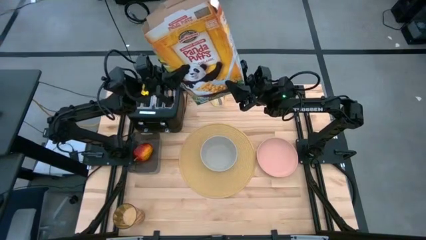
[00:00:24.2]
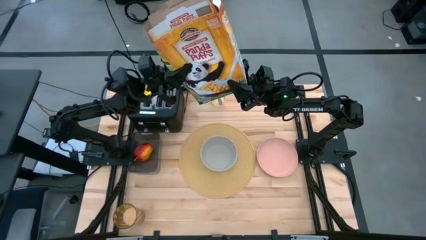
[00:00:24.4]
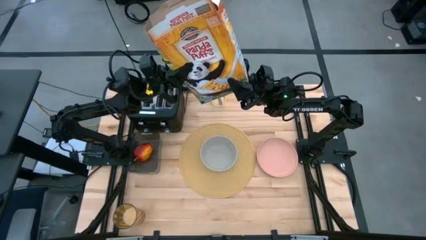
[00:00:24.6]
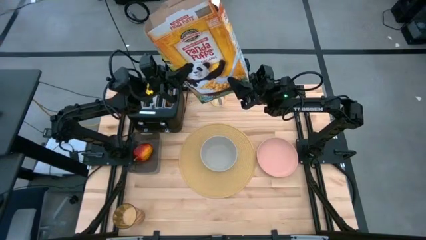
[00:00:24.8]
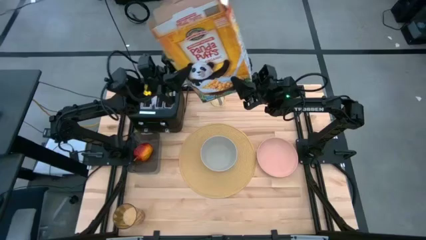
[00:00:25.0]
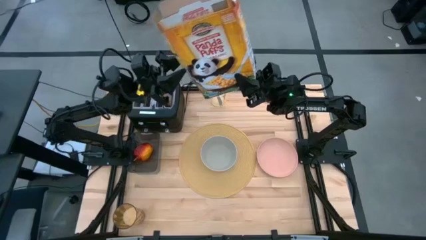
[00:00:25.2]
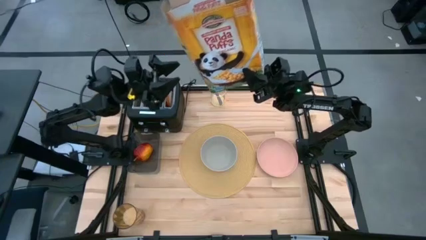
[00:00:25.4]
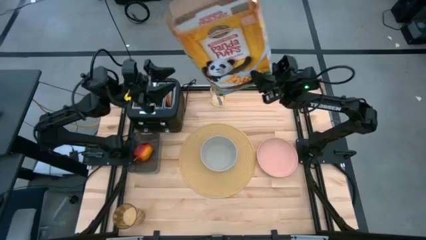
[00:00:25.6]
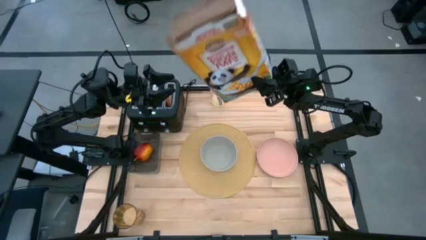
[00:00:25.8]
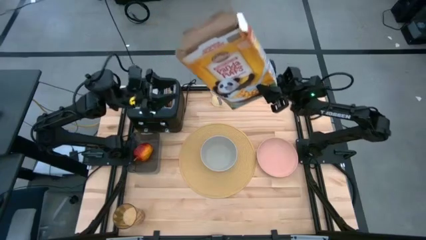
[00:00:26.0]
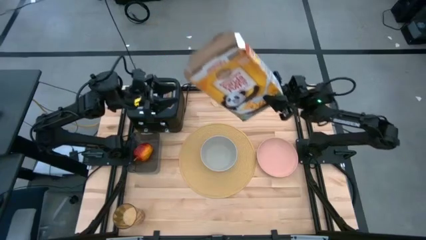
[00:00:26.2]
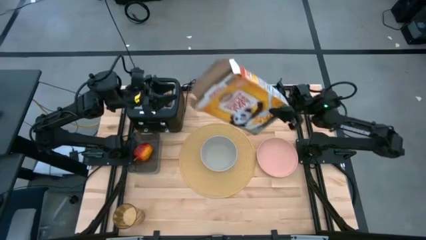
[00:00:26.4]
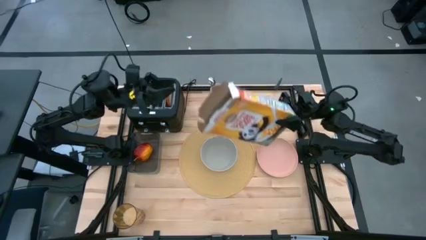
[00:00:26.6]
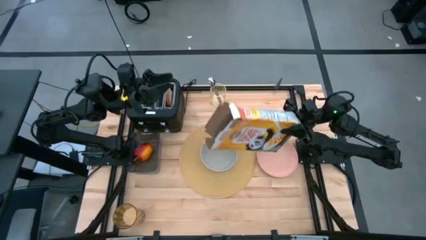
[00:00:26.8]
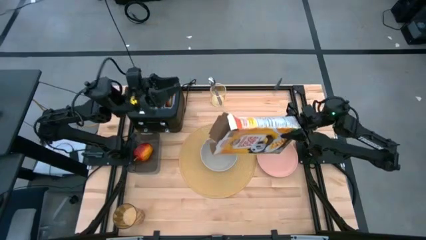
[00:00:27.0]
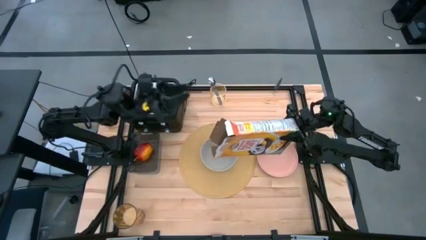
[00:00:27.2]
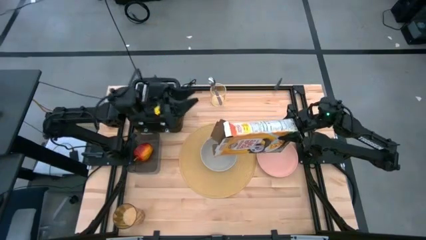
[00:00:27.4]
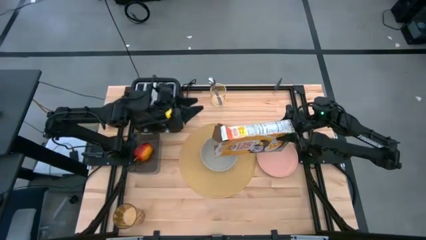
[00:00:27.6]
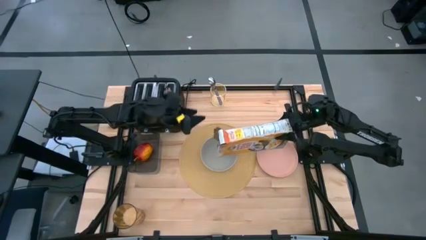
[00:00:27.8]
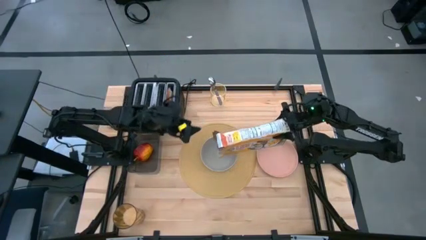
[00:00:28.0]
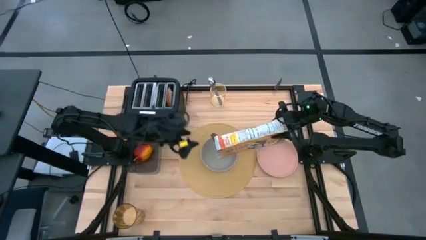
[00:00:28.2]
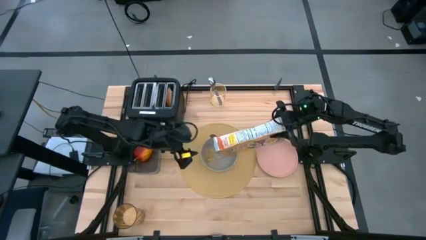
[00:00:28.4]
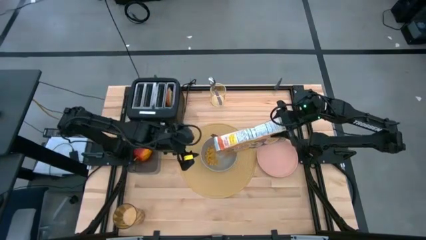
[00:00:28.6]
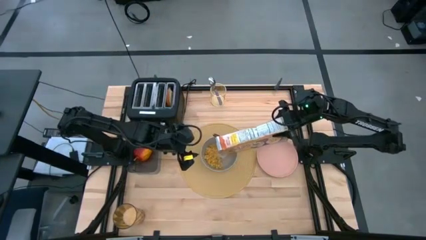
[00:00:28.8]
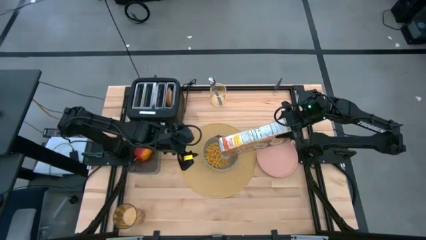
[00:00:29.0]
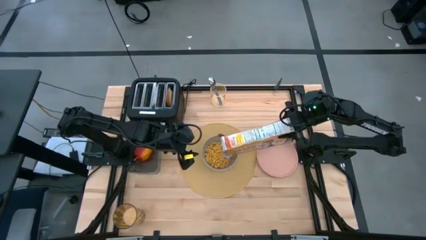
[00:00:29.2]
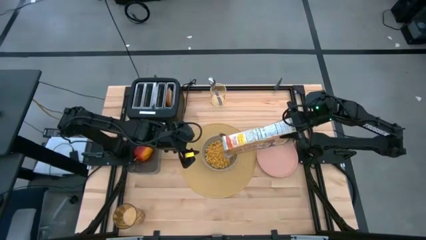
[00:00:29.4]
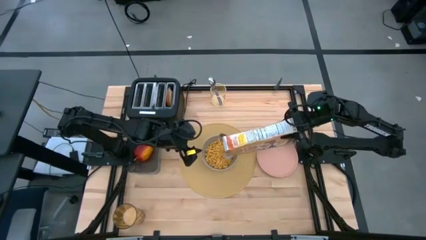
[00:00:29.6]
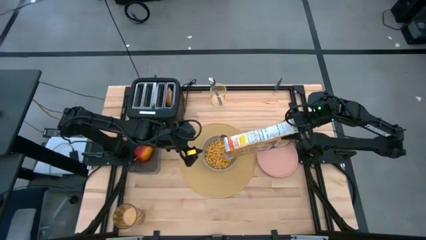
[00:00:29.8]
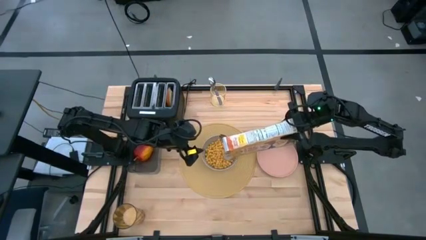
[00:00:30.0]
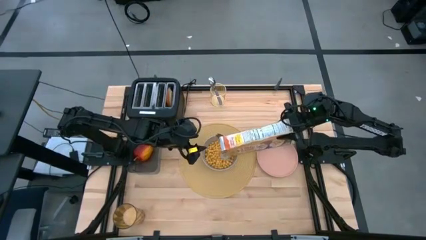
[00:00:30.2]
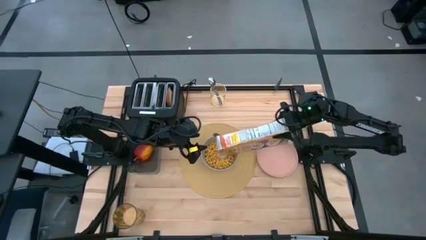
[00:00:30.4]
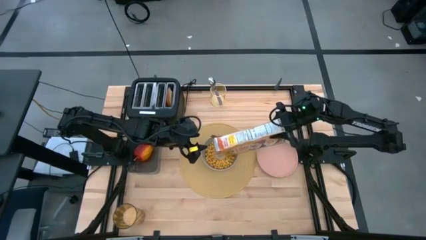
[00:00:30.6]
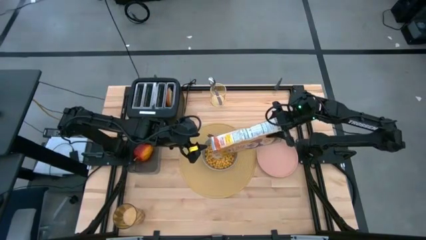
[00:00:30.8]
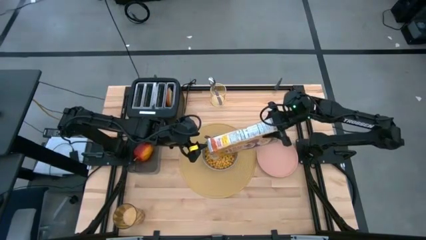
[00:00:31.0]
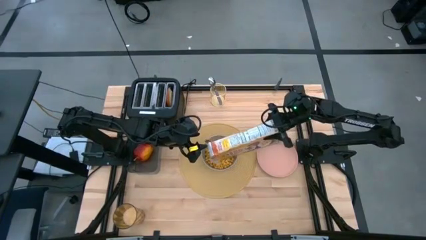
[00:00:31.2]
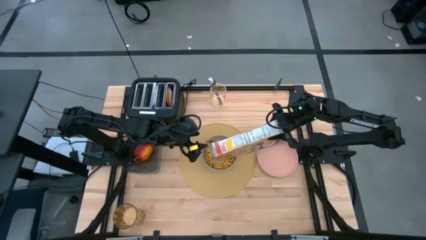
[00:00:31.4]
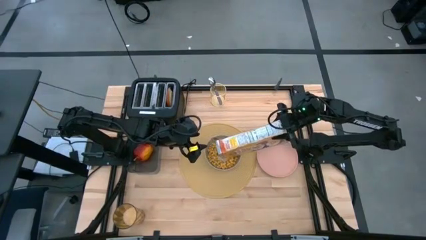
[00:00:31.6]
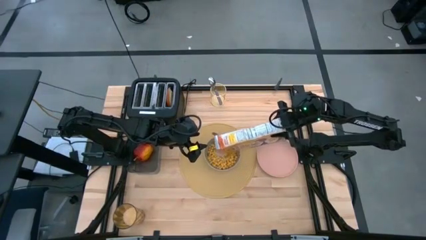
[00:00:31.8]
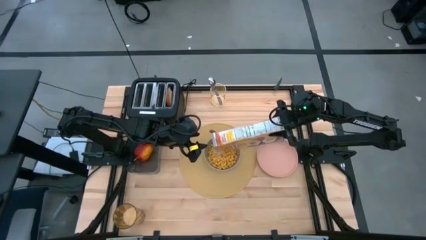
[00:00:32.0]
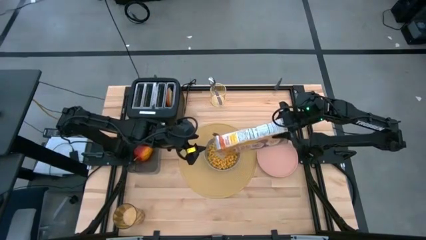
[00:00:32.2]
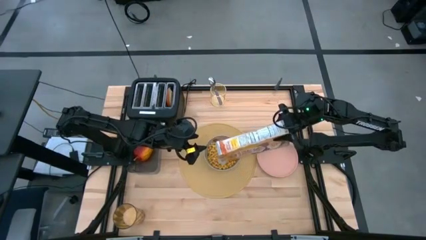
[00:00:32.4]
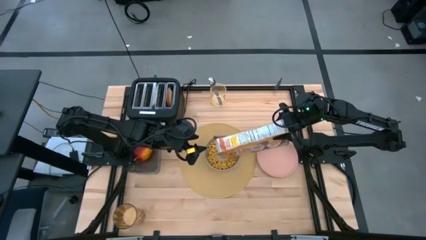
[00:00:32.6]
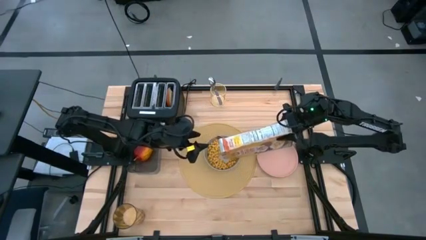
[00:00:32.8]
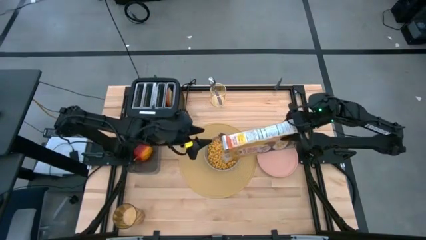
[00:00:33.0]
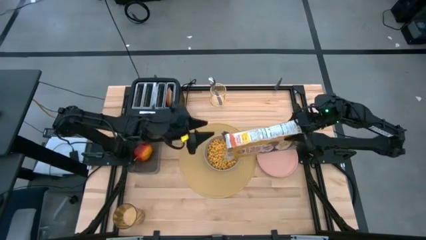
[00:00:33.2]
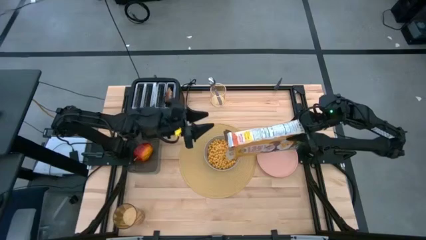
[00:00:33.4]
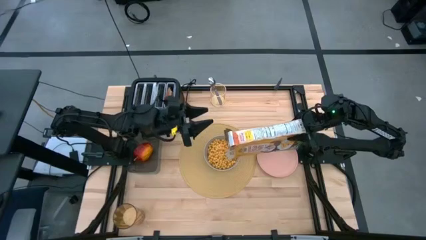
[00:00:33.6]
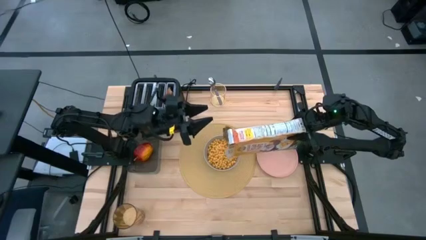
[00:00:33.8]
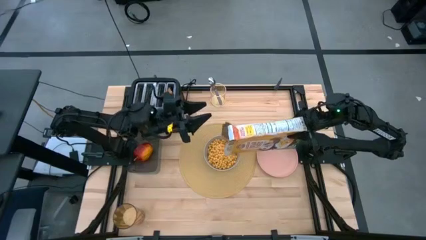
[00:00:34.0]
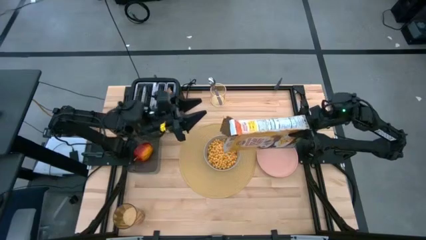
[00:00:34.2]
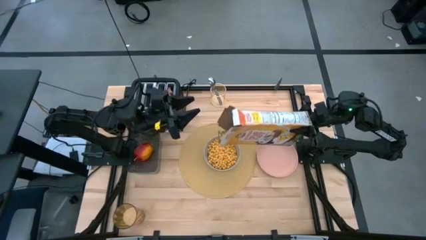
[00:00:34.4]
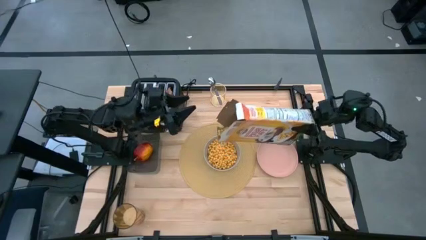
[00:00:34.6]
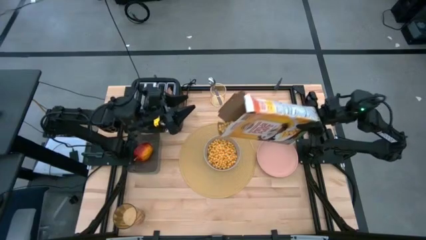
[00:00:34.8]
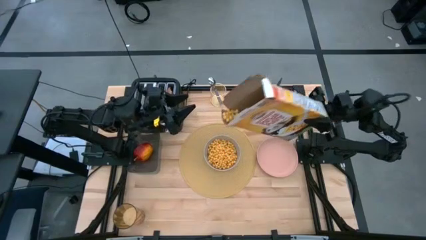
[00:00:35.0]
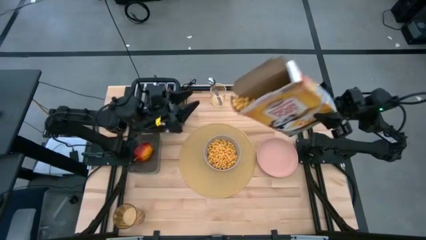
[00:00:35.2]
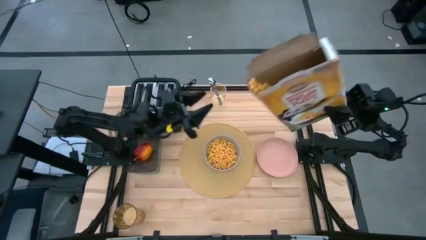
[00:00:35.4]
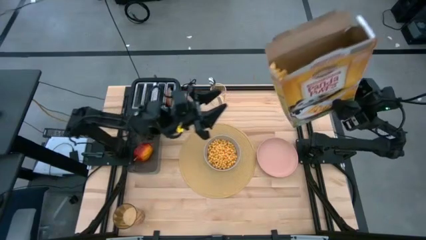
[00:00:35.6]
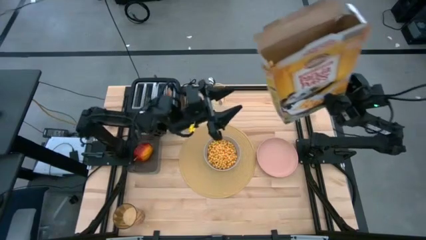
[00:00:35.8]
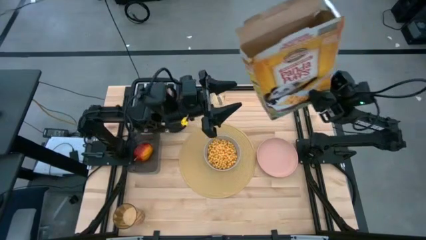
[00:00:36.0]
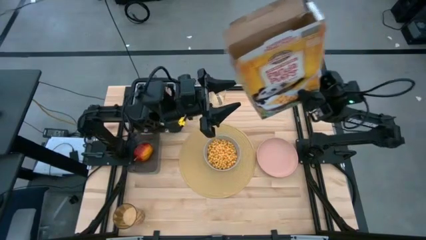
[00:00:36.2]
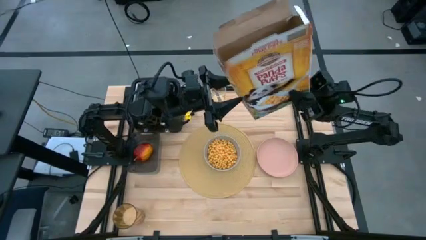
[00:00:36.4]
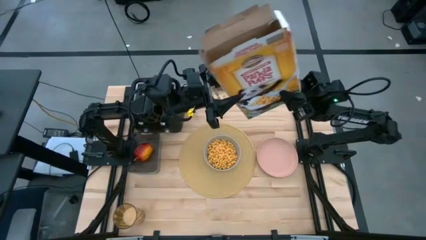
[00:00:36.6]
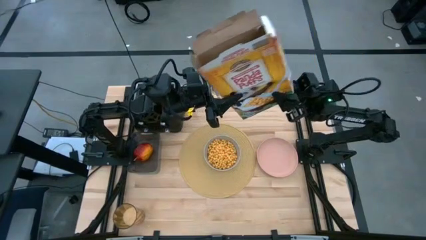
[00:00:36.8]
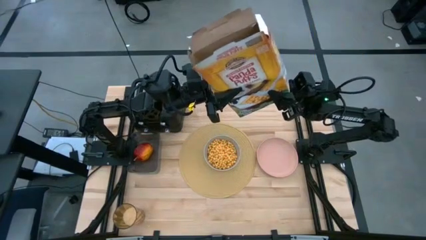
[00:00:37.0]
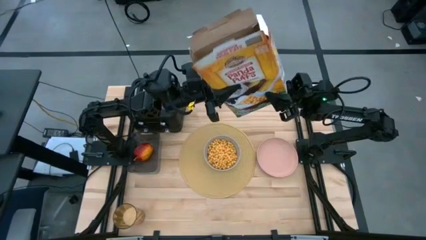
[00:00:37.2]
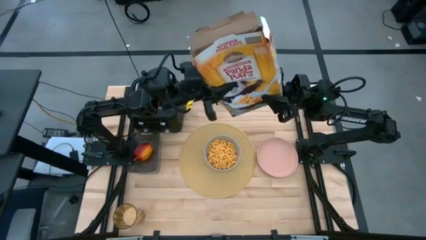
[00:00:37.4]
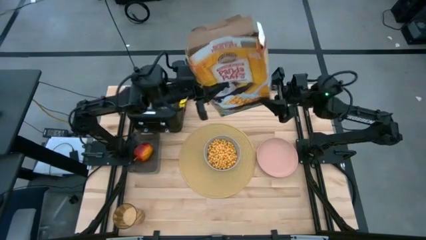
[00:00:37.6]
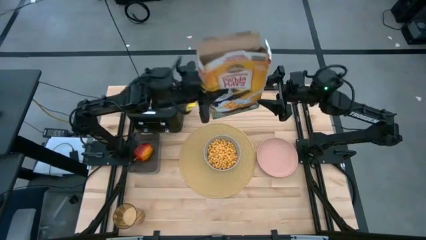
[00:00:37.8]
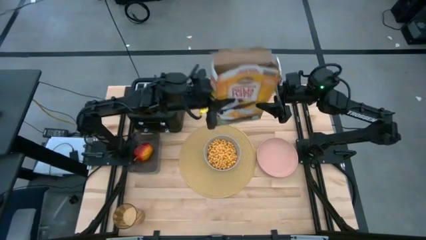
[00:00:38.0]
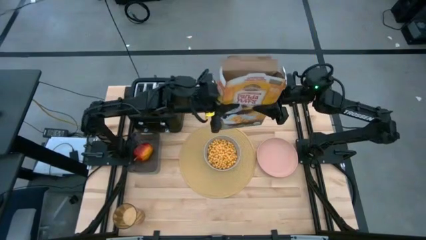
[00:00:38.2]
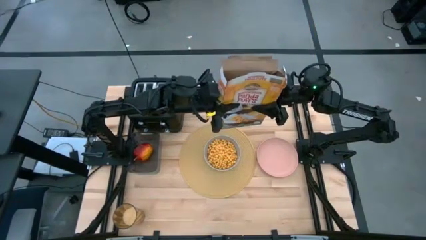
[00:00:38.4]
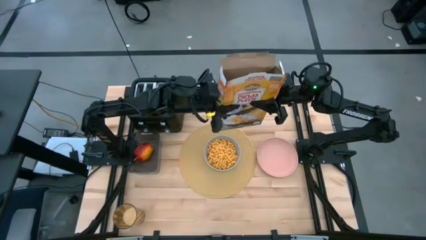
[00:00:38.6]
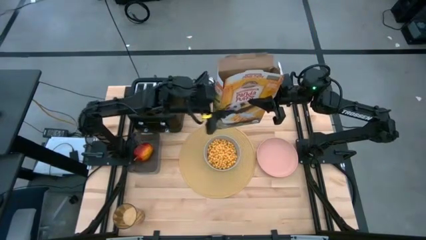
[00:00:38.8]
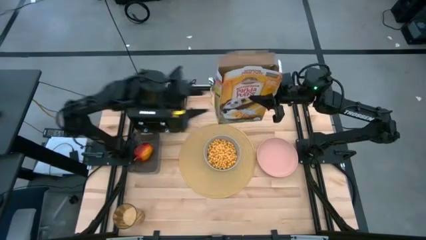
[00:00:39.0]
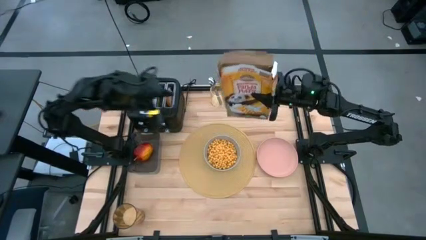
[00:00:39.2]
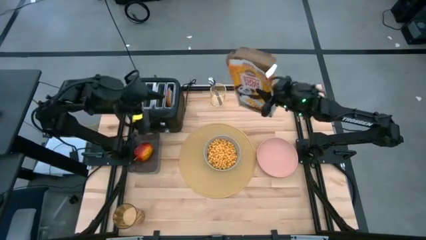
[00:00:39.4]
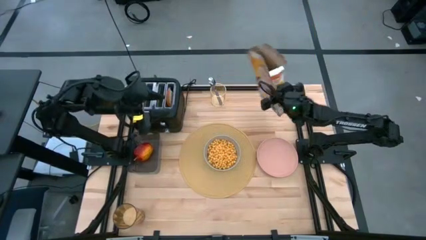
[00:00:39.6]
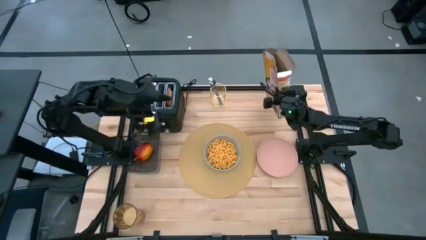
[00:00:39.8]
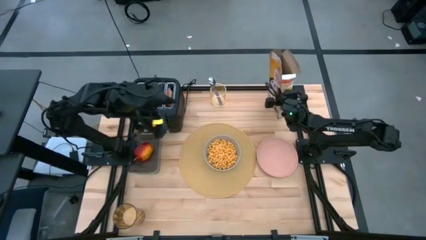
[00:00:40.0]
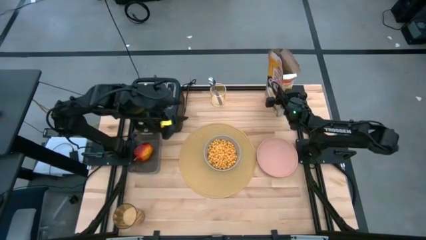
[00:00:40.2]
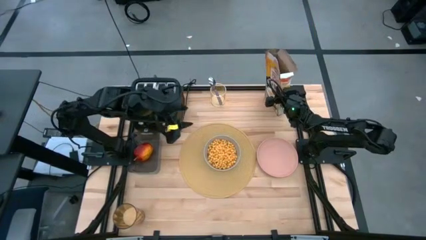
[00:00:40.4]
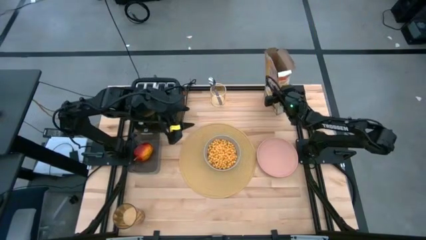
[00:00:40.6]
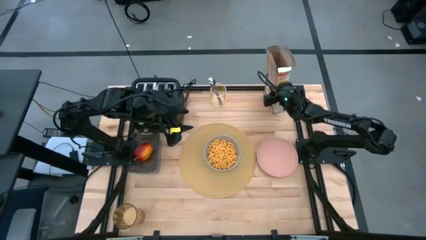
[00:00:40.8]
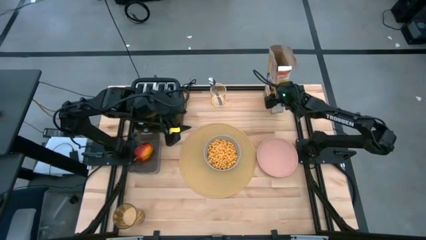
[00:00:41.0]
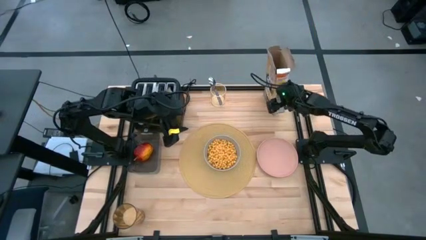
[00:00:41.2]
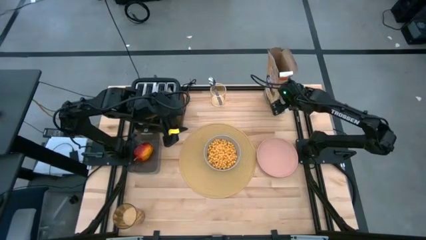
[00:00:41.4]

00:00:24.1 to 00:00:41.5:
Task: Arrange a breakfast setting
Pour the cereal into the gray bowl
